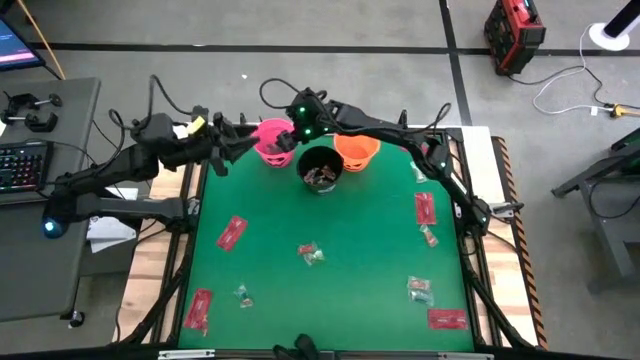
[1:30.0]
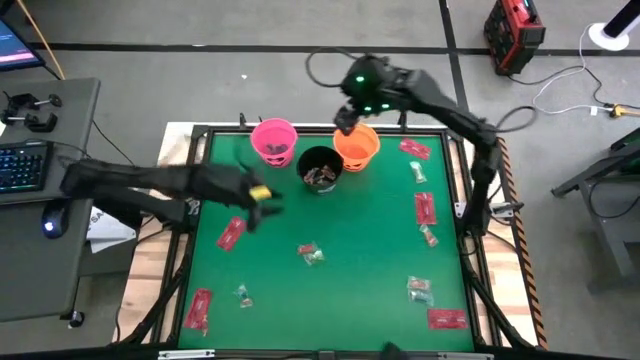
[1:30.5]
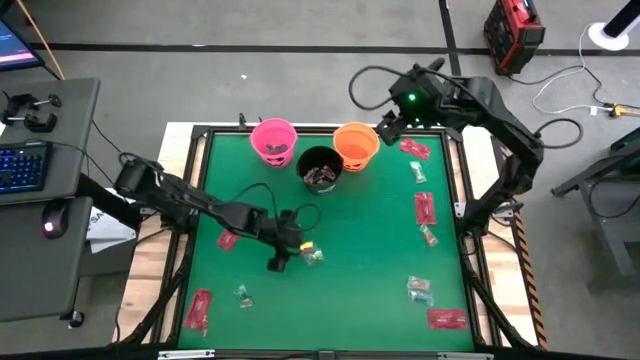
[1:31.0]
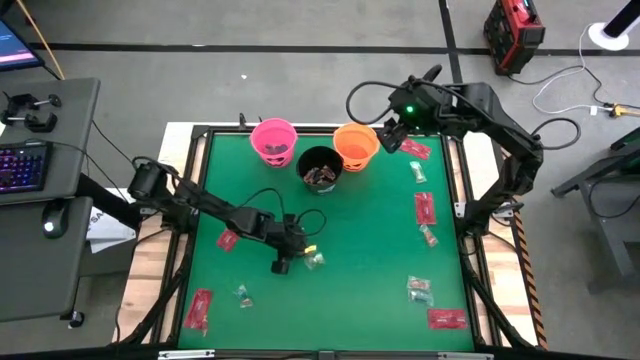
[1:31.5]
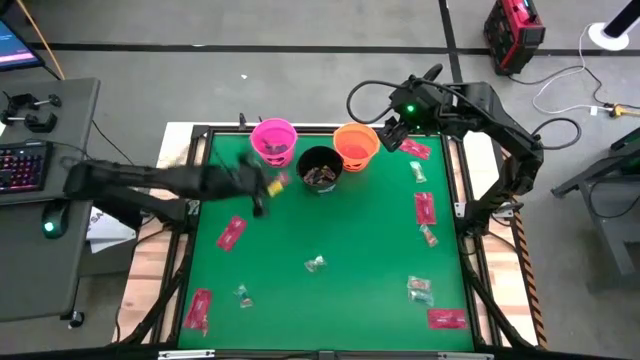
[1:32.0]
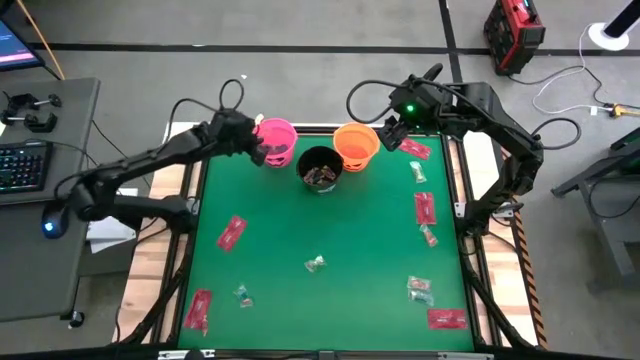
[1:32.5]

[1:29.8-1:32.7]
Task: Sort candy by brand, put in halloween buckets
Put the orange gummy into the pink bucket

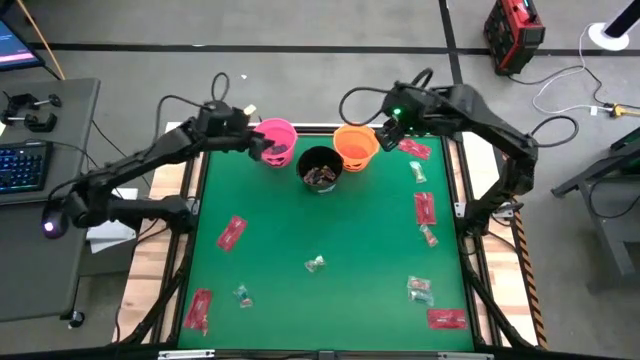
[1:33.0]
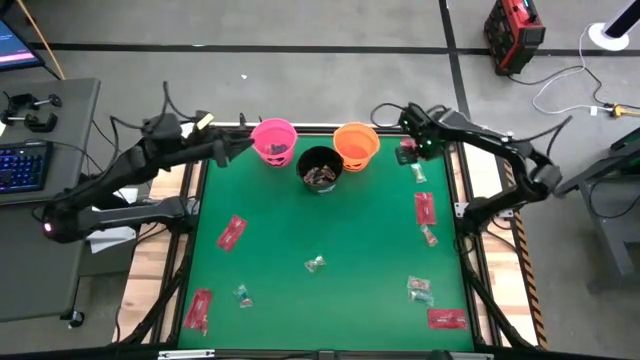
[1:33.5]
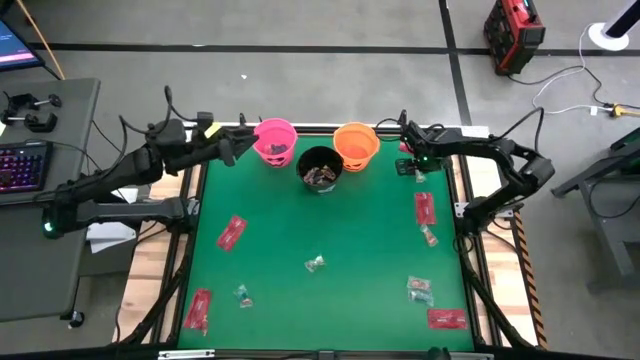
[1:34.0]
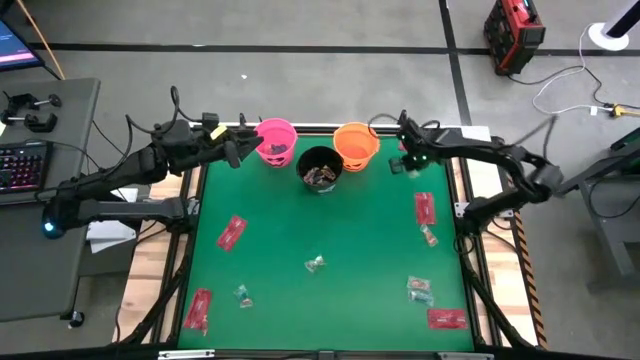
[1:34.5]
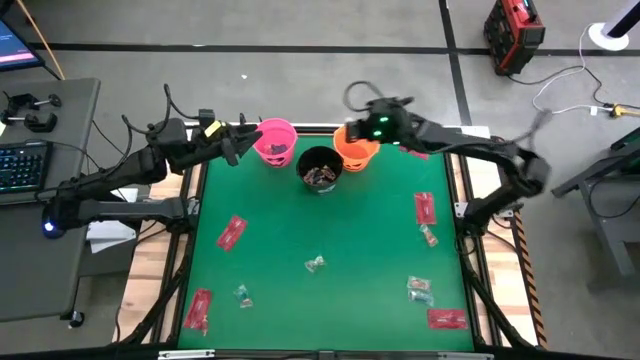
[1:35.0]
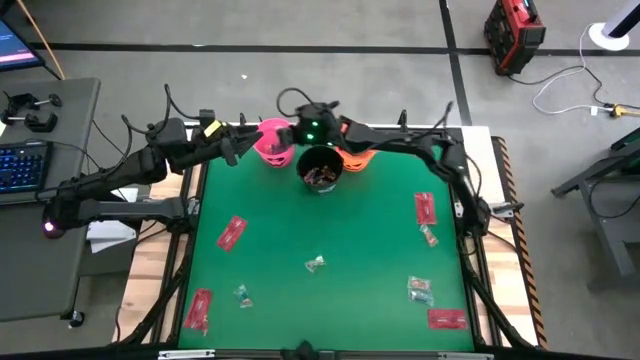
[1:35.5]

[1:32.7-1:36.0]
Put the green gummy into the pink bucket

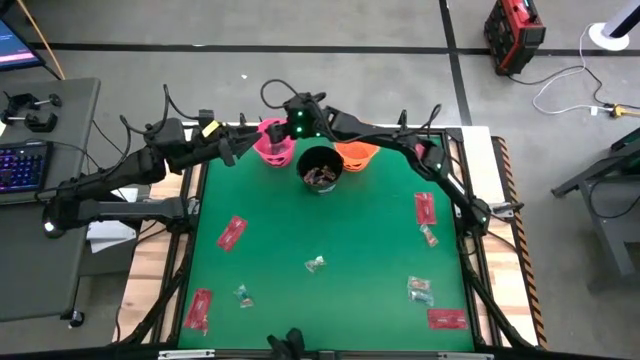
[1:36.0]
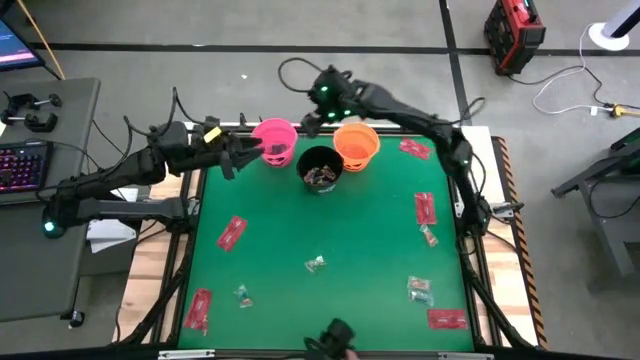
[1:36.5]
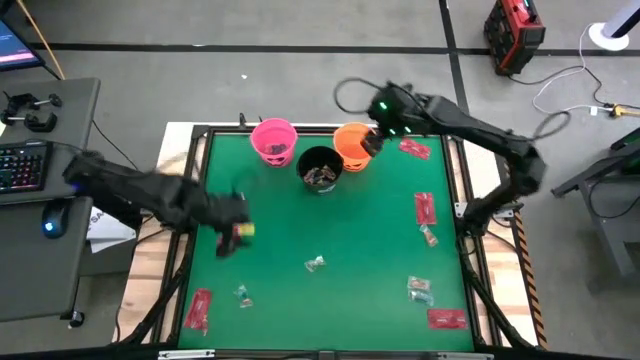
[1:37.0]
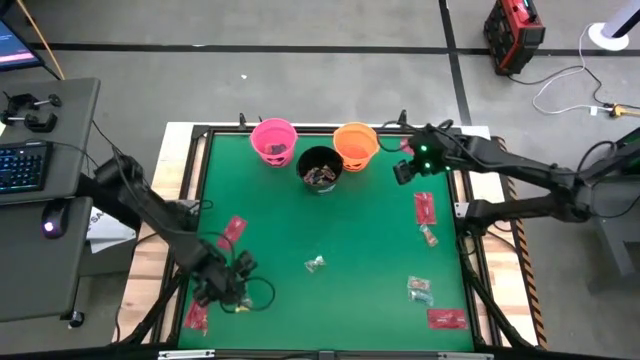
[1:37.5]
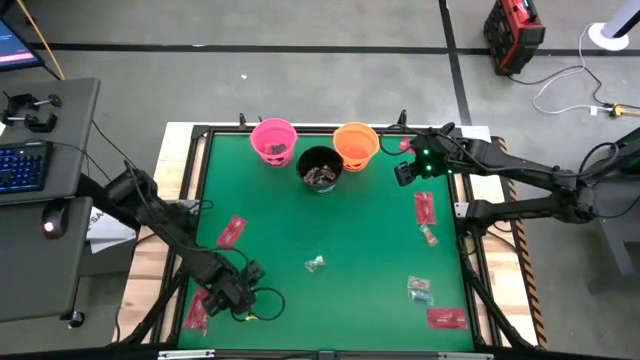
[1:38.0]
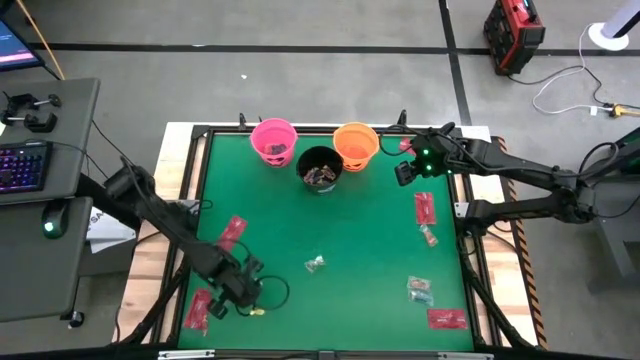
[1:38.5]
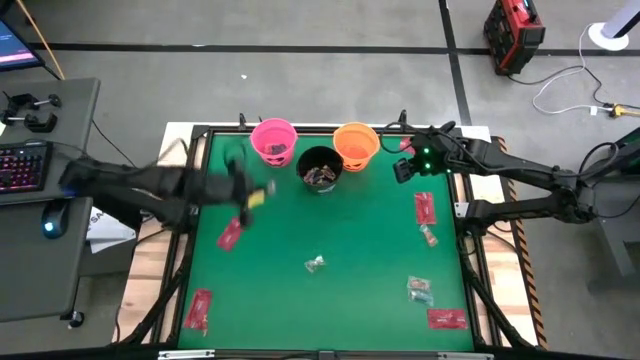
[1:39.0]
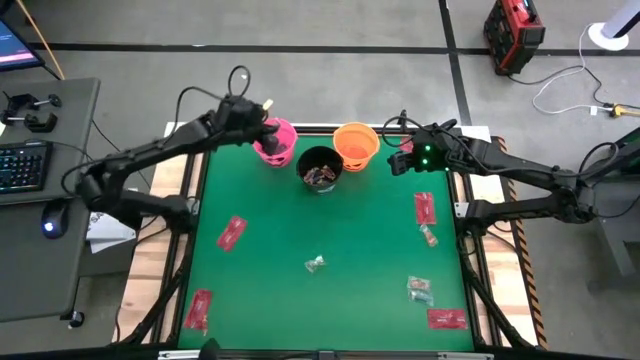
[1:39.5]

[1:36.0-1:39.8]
Put the blue gummy into the pink bucket

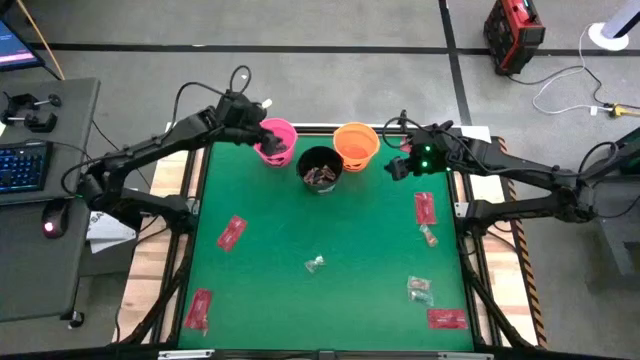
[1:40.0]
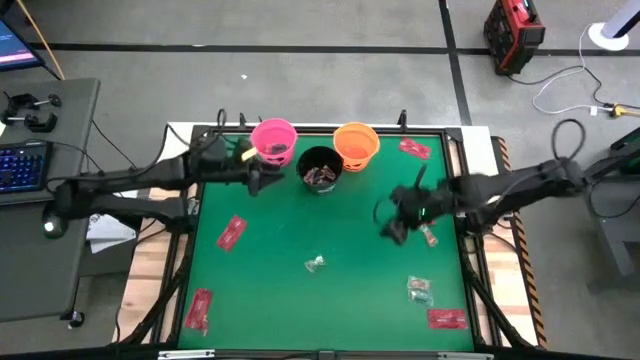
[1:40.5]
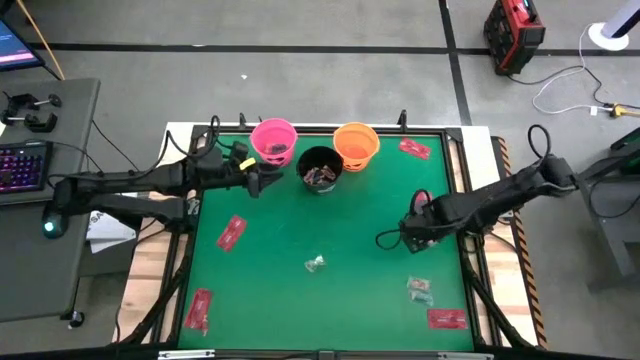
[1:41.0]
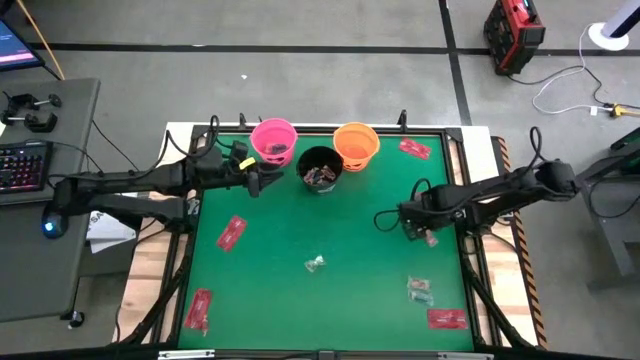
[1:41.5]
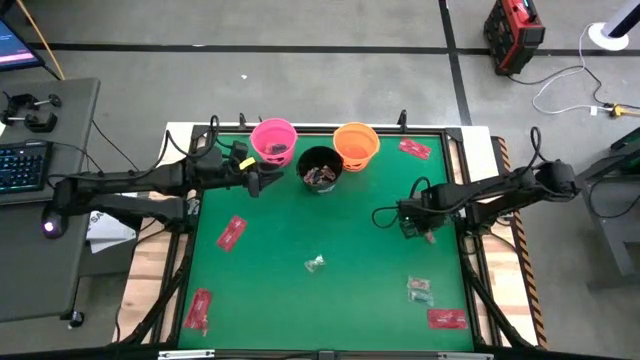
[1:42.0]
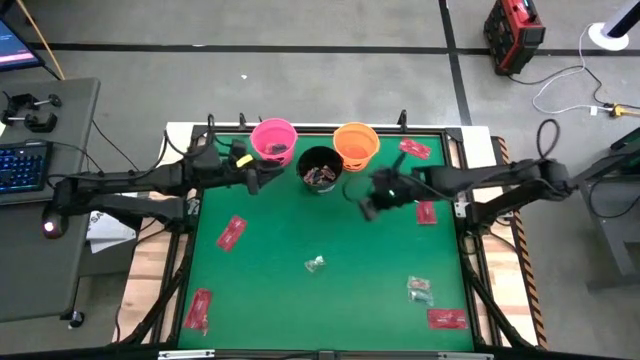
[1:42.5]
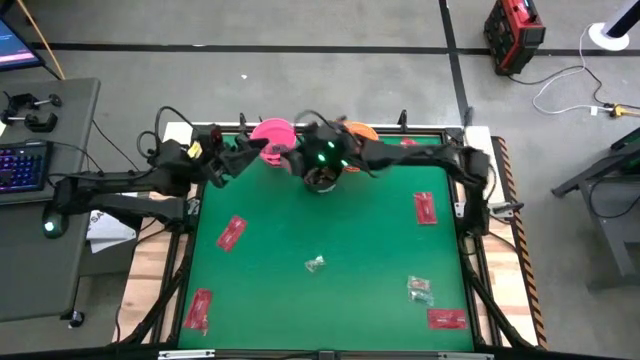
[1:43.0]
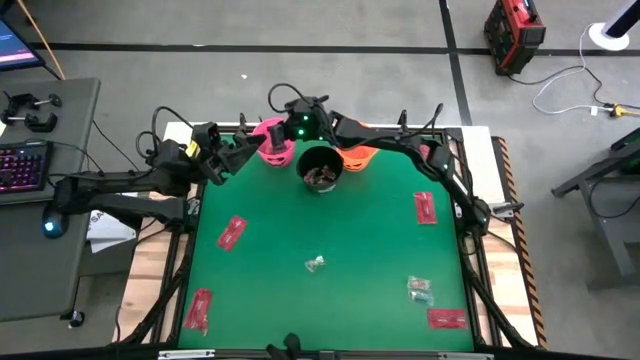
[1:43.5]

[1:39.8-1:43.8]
Put the orange gummy into the pink bucket

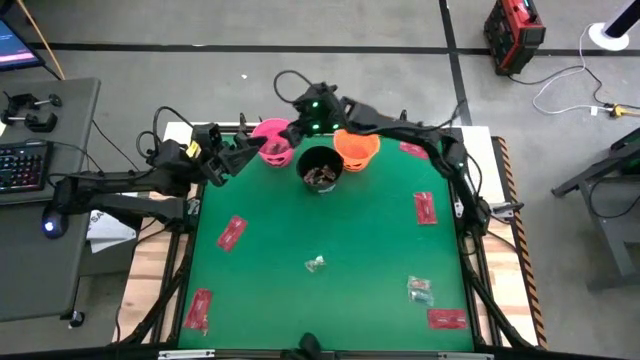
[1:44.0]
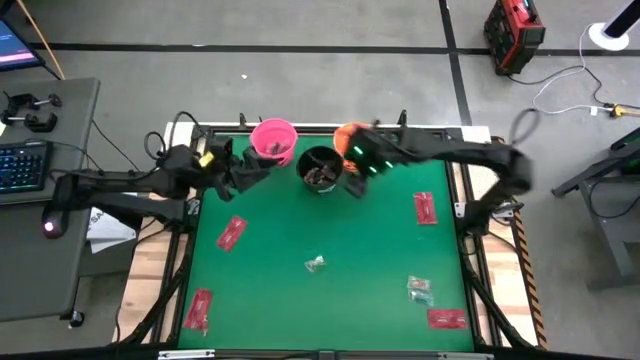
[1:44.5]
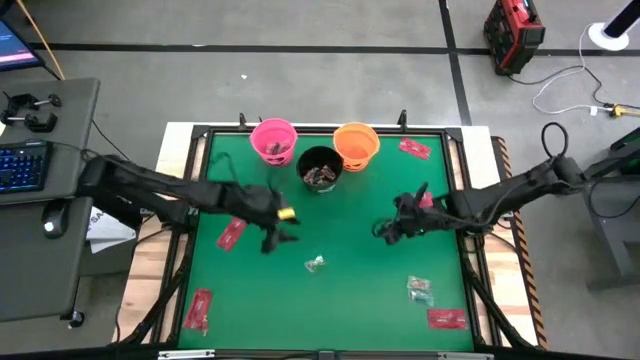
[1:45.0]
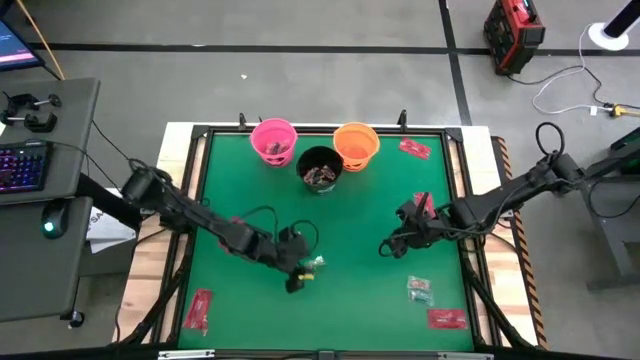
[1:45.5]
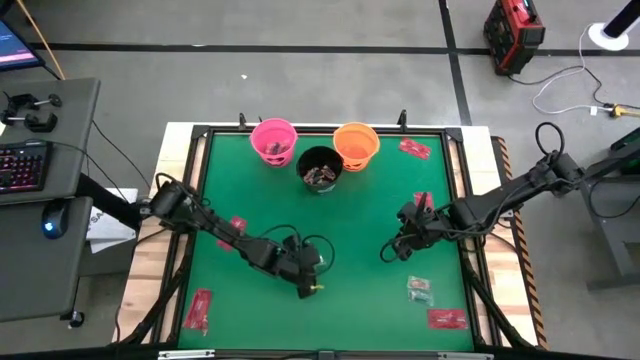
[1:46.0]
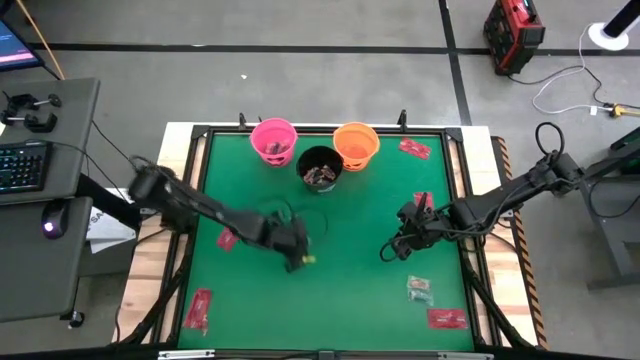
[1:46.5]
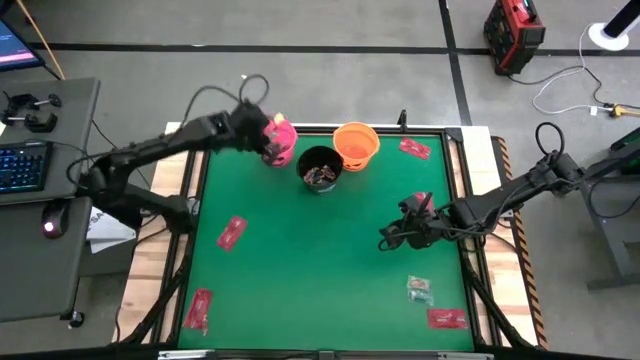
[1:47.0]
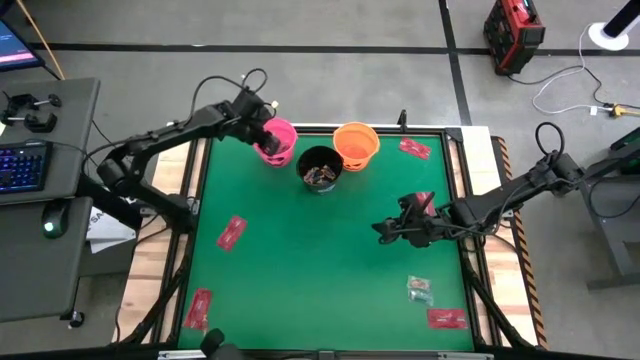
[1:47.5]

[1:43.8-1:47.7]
Put the green gummy into the pink bucket

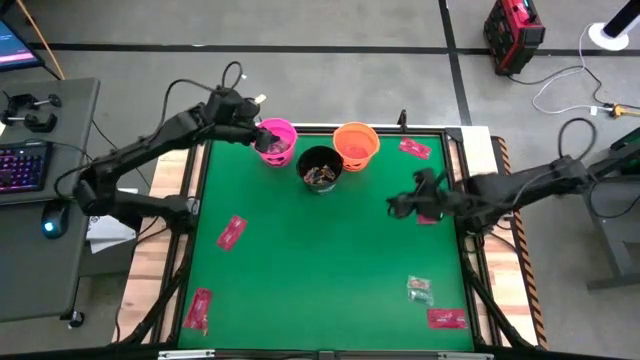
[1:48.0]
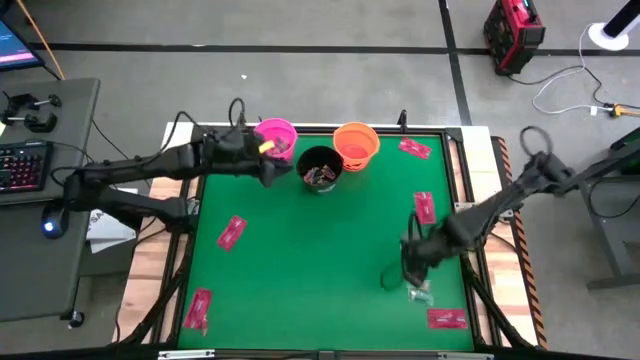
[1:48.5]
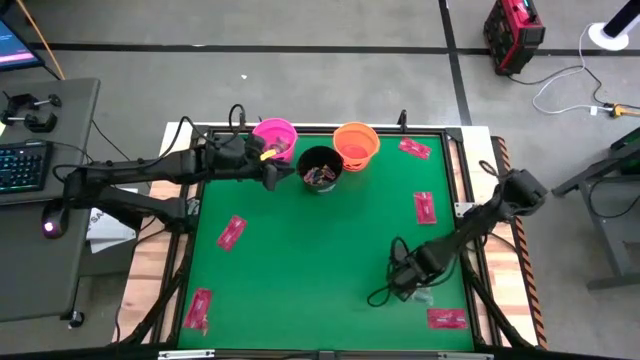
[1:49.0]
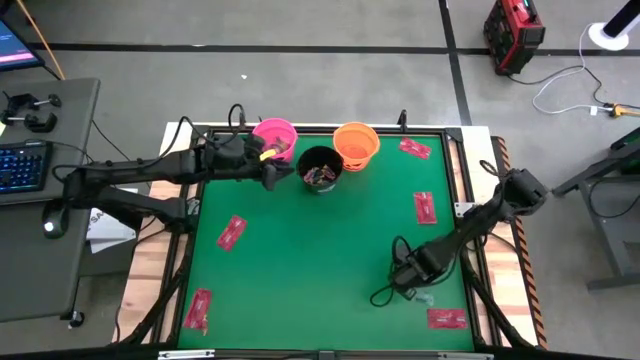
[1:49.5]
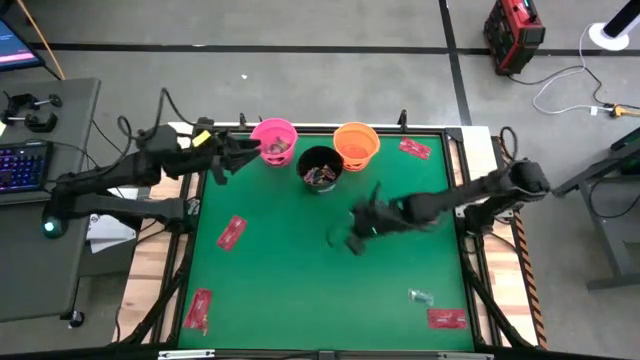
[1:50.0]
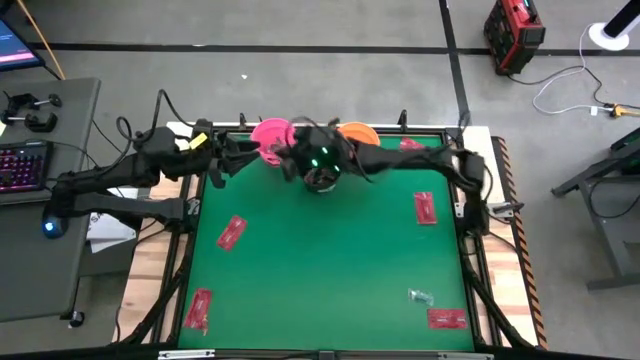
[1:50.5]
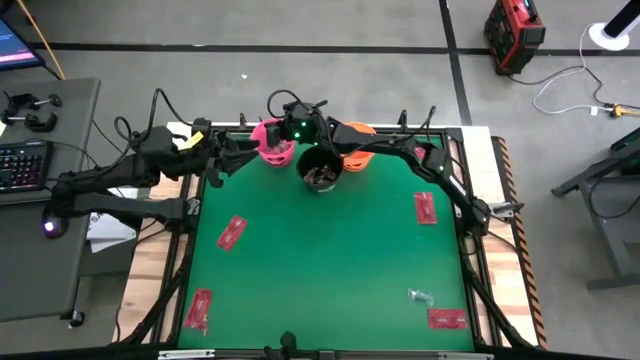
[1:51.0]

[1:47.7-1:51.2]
Put the orange gummy into the pink bucket

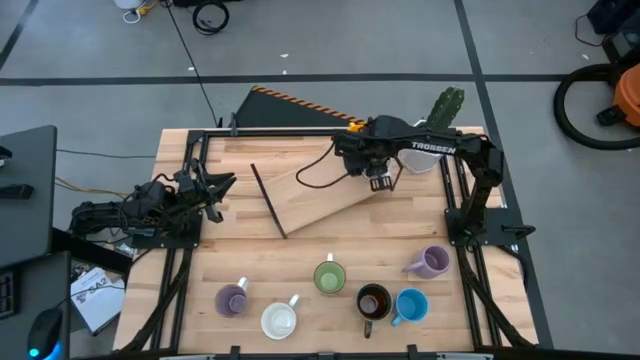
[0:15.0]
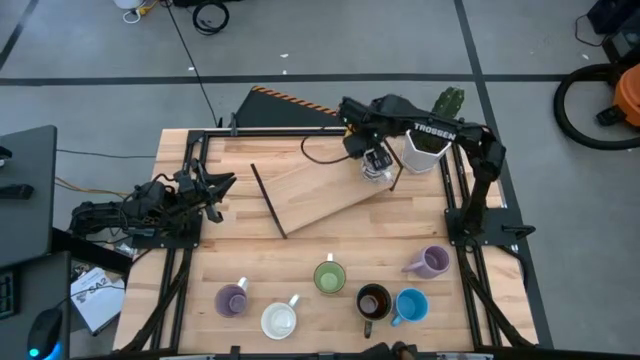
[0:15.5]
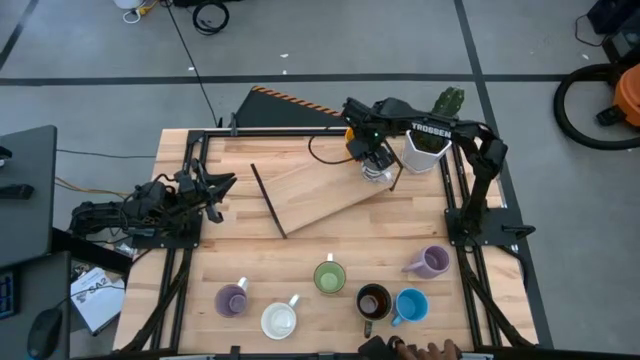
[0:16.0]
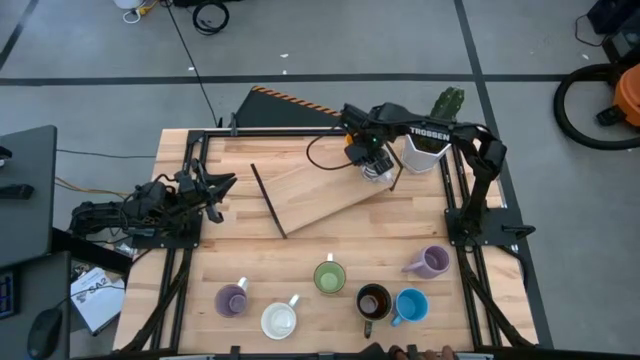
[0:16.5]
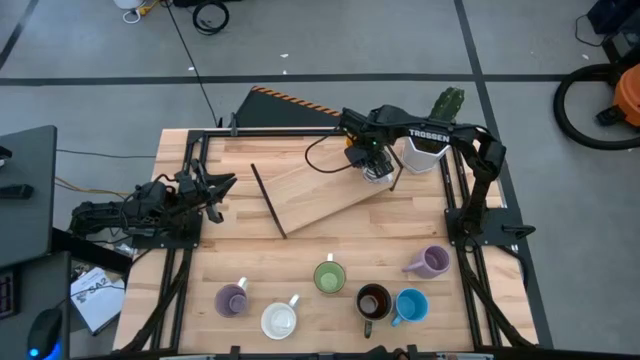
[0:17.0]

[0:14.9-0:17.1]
Task: Place coffee mugs
Adjust the mugs on the shelf
